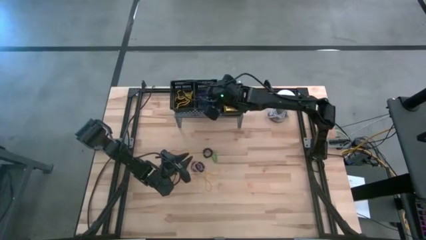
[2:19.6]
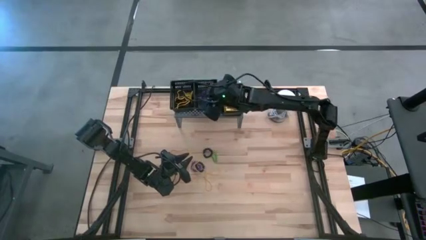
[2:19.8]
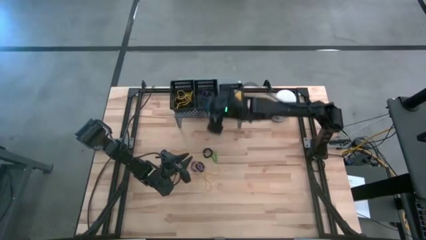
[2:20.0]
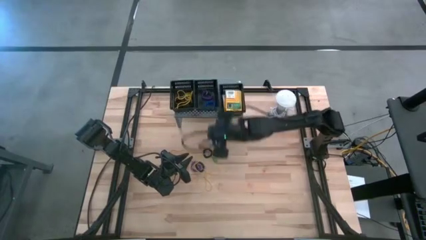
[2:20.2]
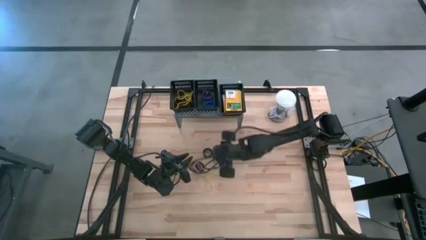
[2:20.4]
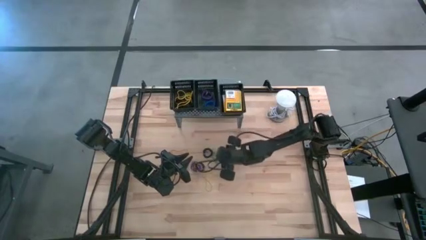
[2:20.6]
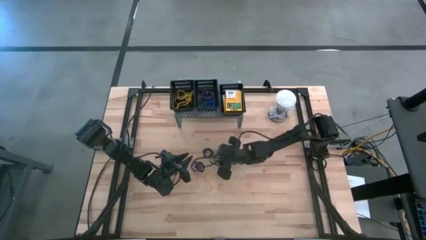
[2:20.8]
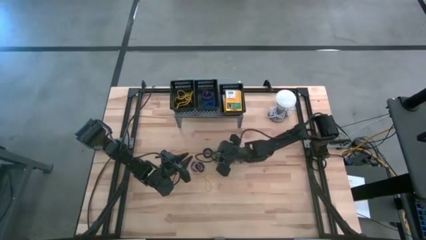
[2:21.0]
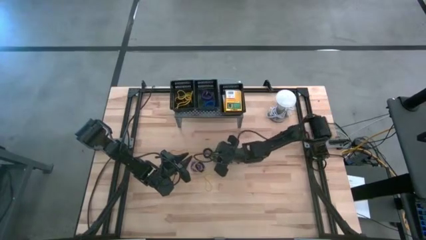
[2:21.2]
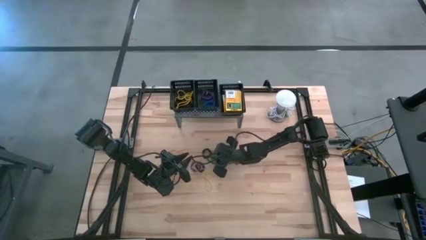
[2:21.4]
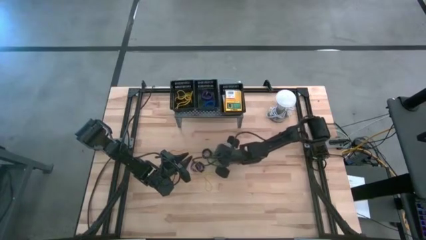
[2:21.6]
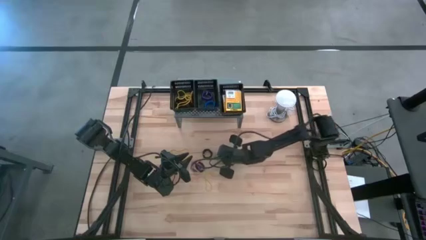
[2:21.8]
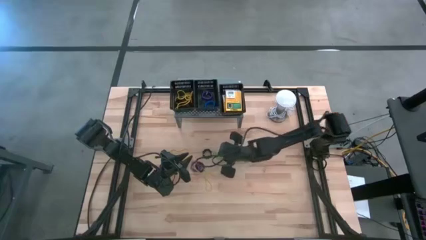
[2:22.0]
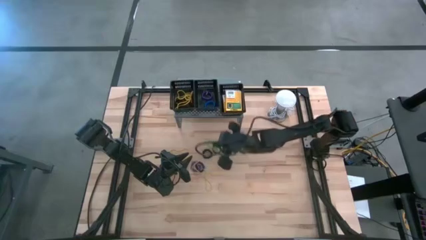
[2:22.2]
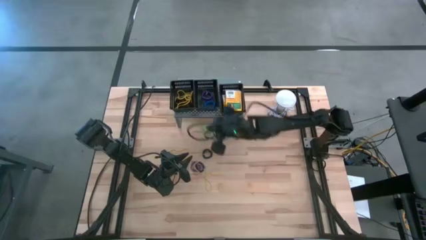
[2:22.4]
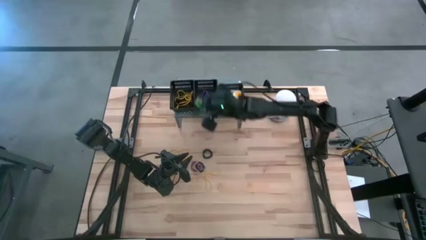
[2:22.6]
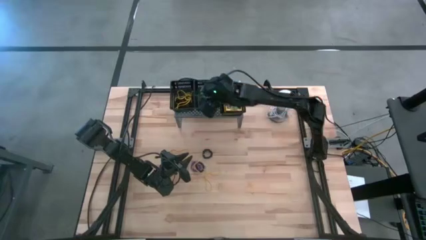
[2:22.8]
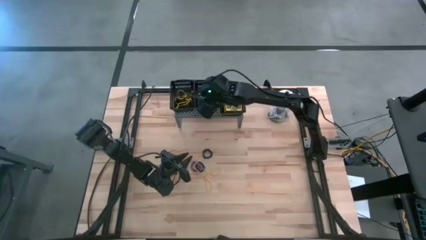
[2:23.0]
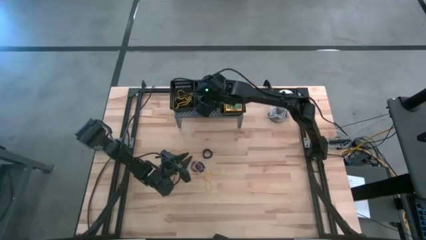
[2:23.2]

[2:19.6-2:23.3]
Task: Pick & Place Office Desk Supplies
Put the green spring keychain into the middle black bin on the shelf

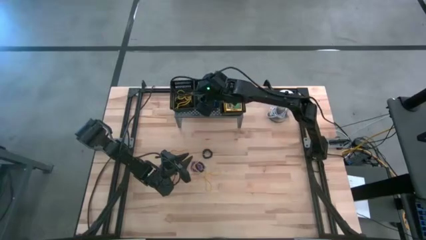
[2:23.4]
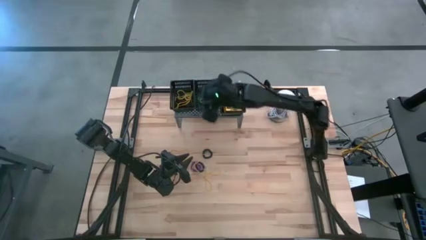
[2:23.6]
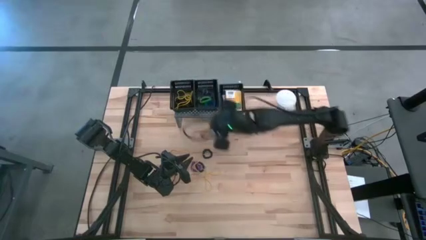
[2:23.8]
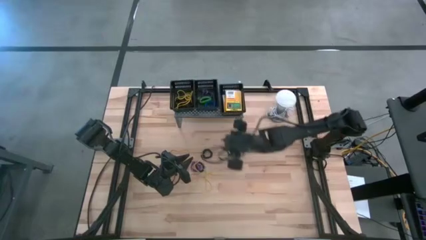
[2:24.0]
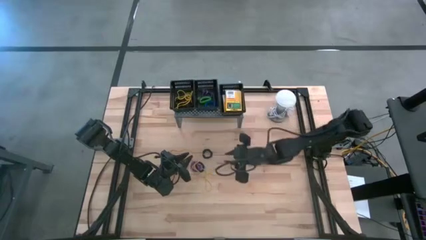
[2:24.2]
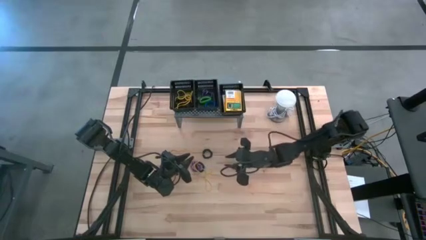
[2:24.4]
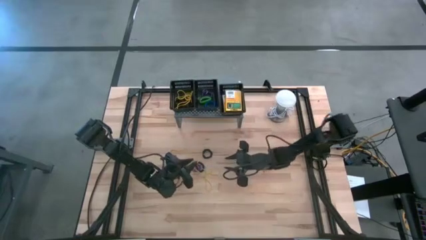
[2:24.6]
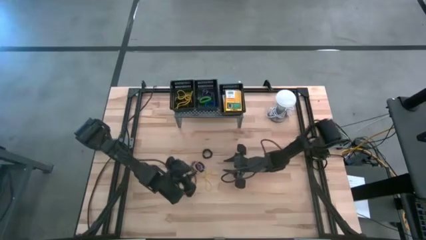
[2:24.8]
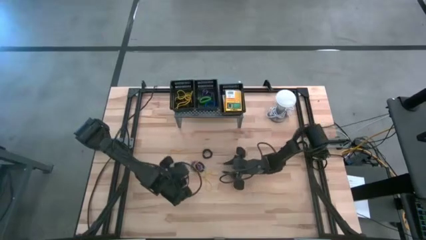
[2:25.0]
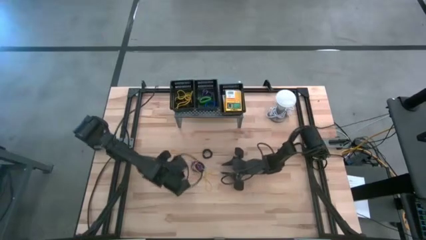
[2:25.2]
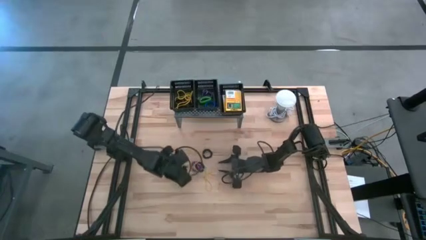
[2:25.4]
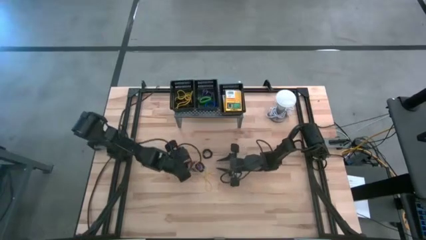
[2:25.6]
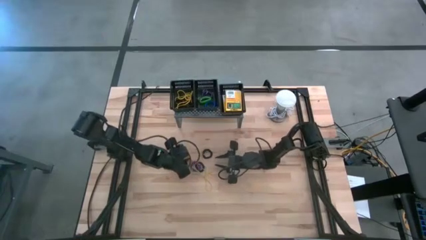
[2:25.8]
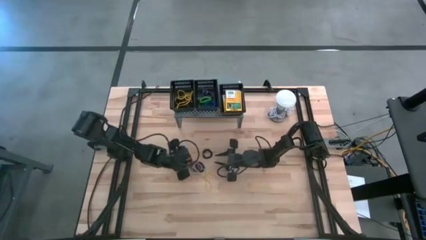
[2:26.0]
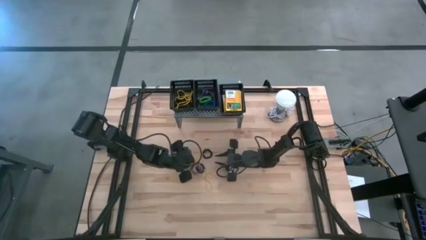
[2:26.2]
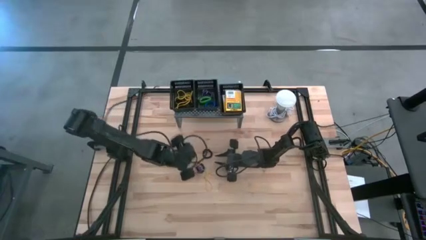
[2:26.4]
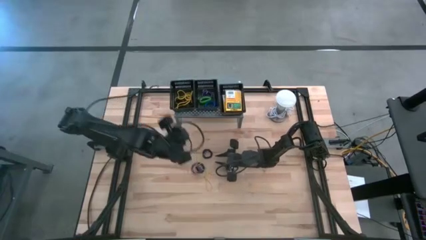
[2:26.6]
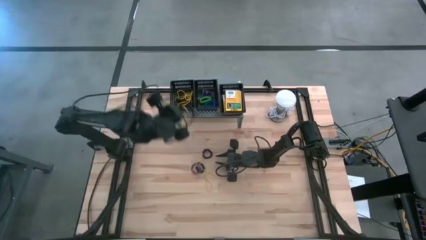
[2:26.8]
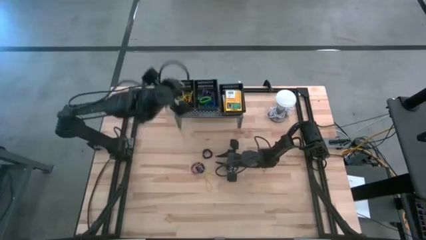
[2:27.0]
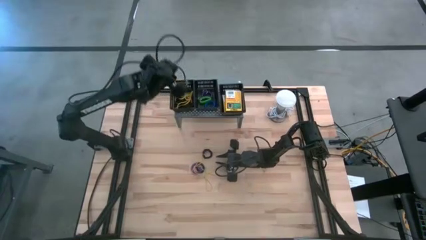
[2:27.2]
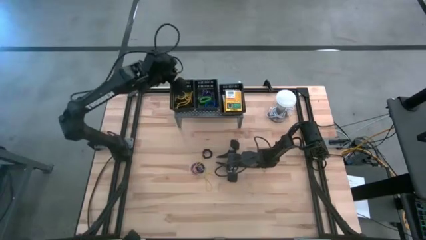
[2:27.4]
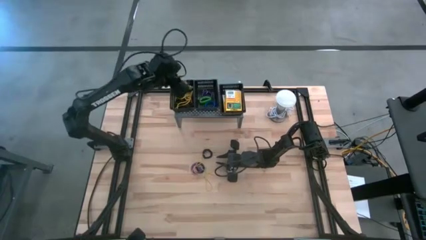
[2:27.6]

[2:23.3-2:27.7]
Put the yellow rubberband into the left black bin on the shelf

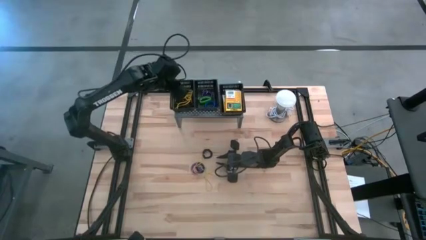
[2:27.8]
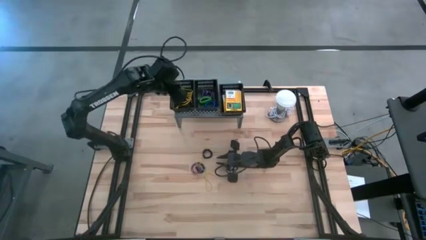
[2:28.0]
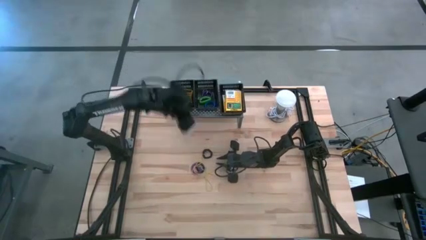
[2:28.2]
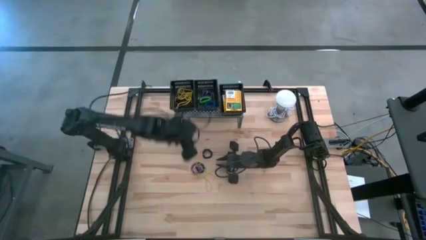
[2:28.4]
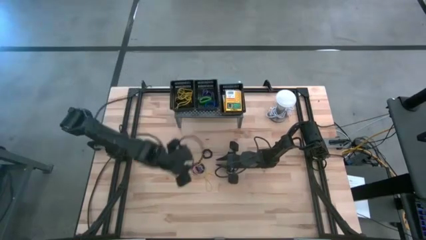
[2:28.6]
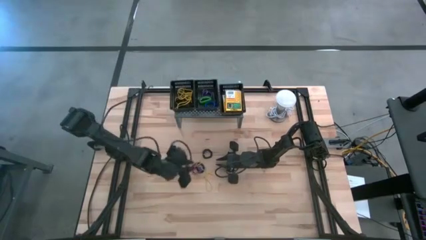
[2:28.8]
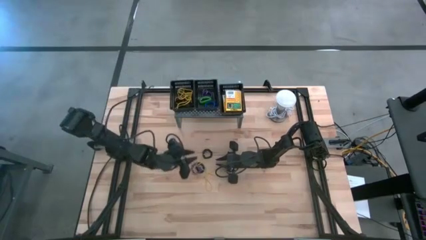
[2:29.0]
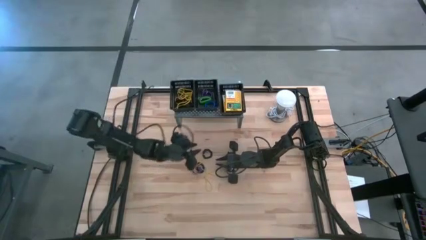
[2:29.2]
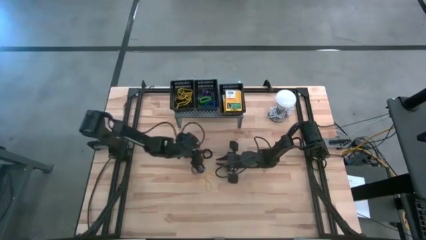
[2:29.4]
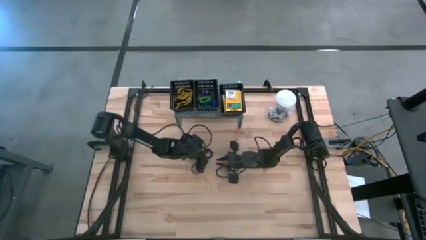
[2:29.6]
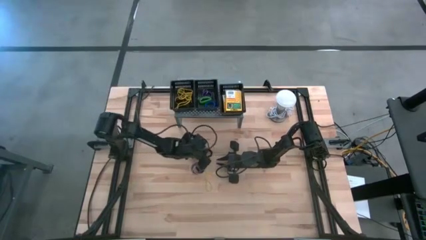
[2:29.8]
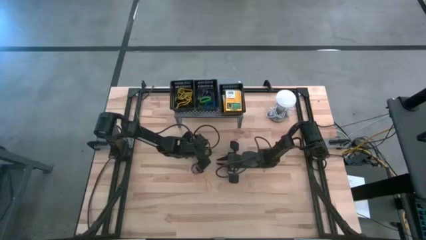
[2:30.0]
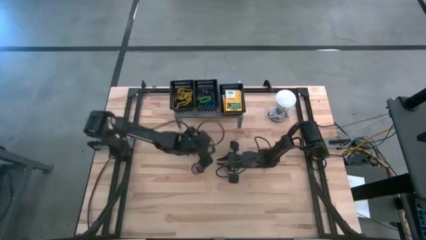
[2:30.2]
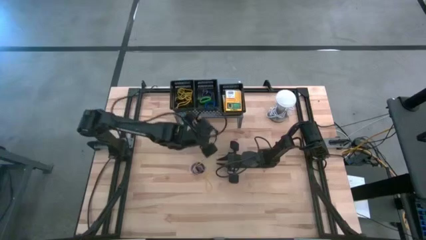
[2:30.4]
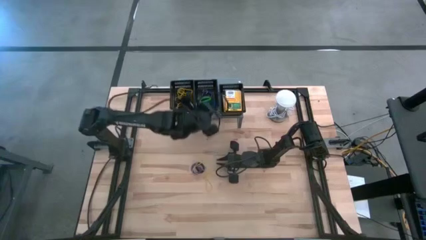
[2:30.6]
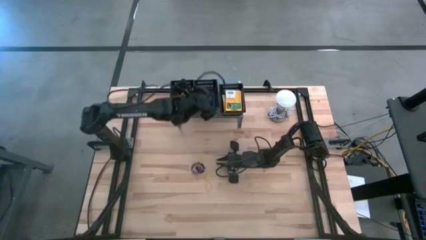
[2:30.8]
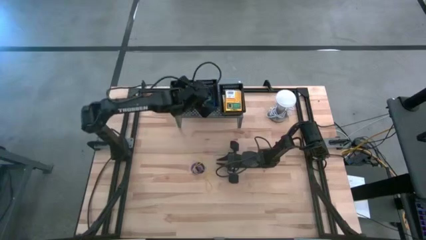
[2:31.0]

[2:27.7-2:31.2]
Put the black spring keychain into the middle black bin on the shelf

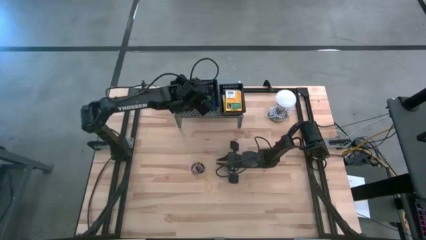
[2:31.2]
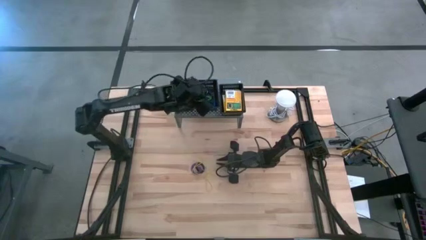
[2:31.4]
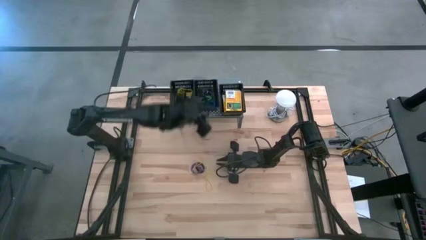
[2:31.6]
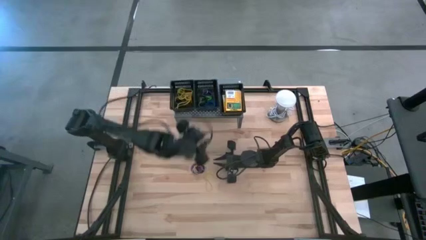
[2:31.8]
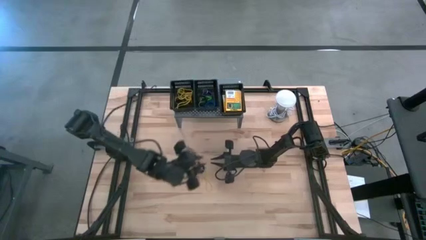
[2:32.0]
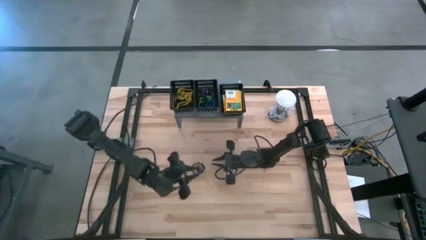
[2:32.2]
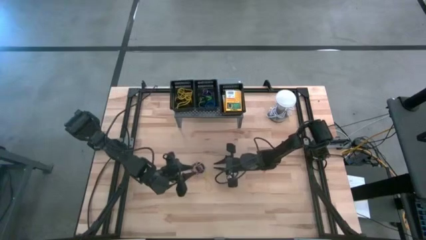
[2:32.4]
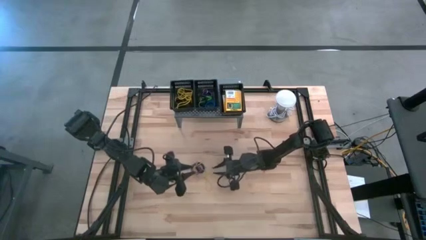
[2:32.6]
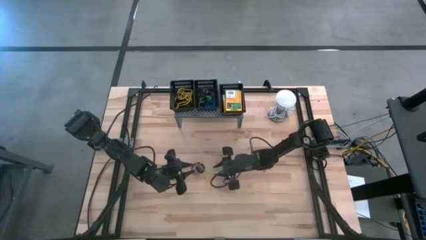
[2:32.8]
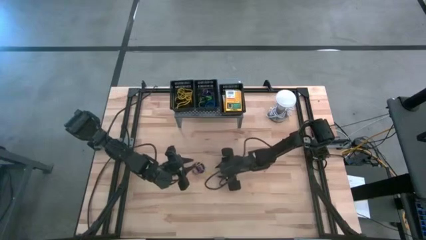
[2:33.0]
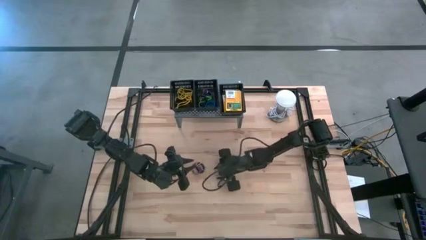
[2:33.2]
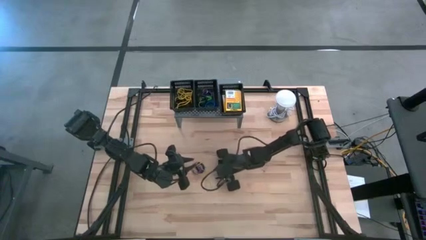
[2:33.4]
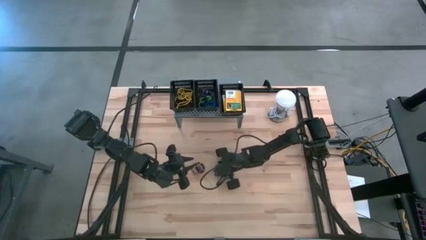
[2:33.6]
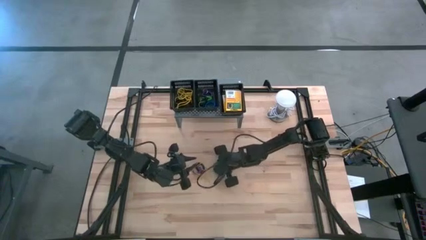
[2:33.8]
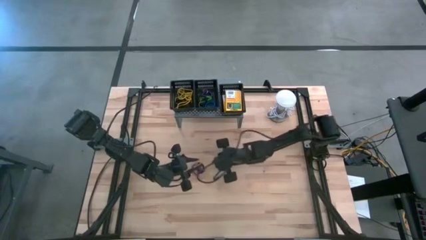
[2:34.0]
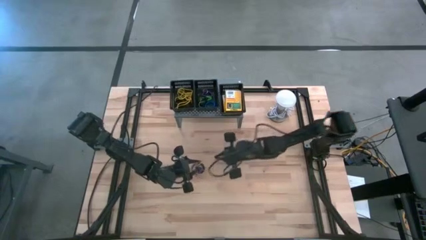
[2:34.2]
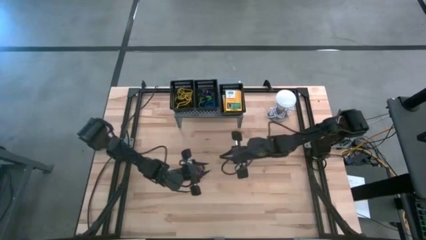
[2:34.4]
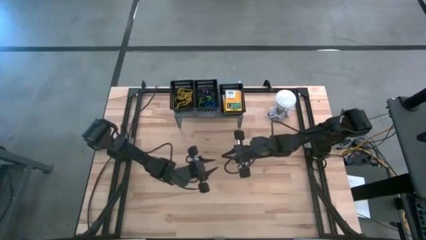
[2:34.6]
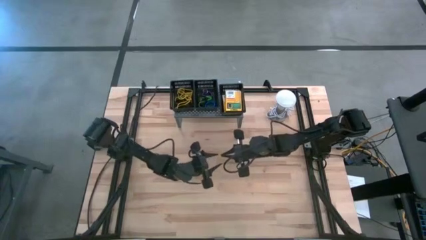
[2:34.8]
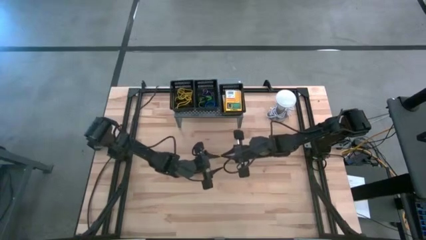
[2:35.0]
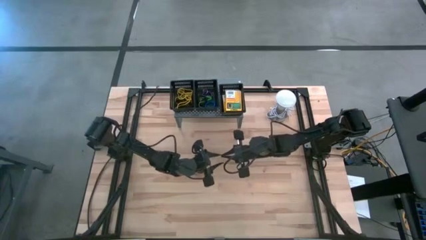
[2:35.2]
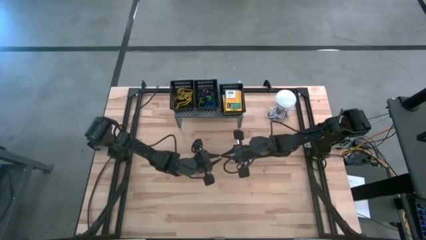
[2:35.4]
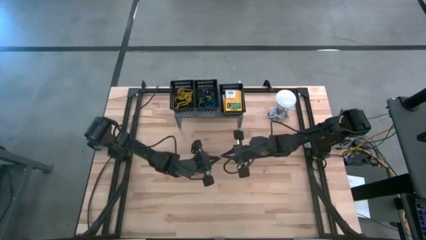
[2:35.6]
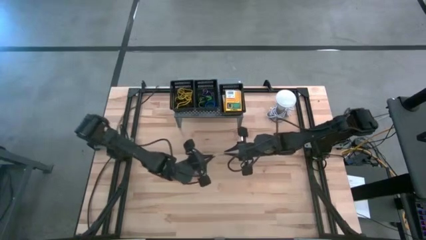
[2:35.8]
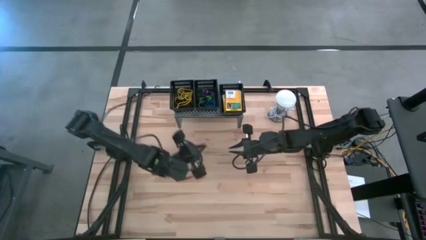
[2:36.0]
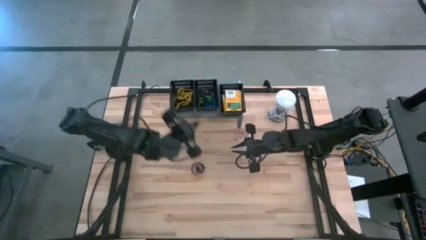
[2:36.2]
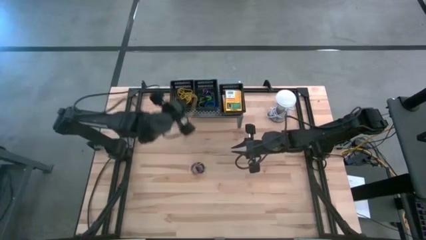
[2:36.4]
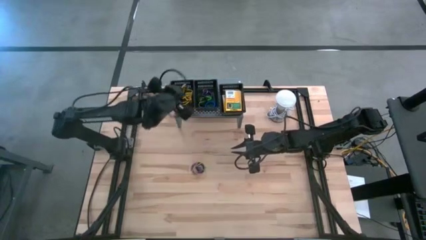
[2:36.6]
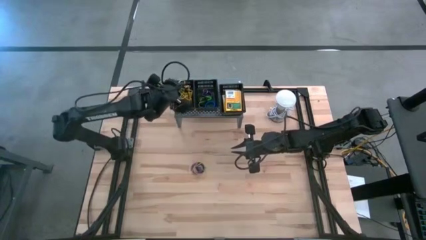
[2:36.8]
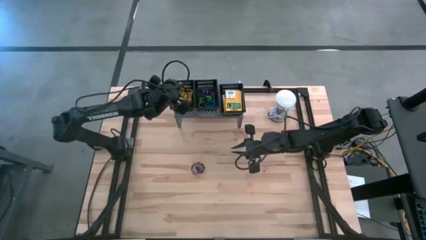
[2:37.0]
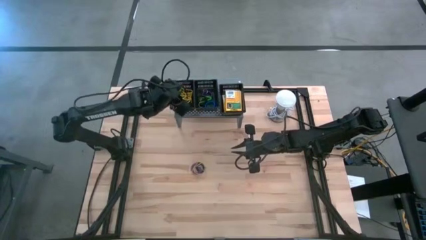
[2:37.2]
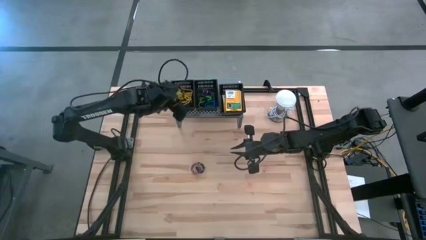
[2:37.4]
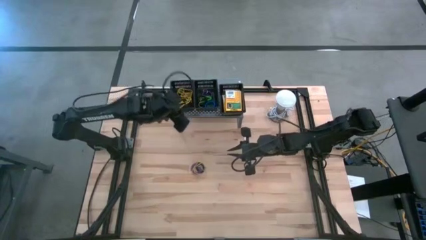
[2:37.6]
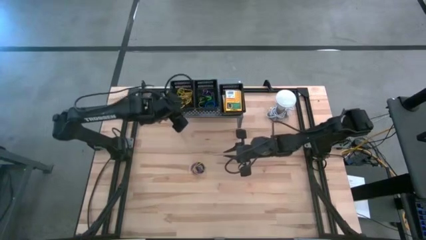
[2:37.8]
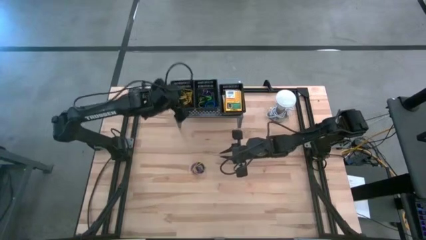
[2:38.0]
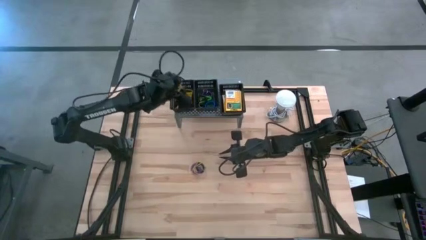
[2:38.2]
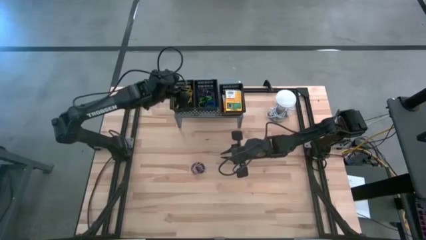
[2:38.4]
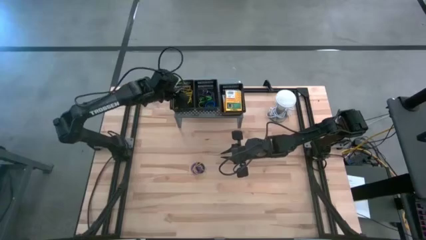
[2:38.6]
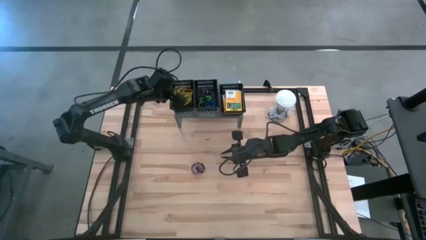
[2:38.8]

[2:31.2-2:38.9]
Put the yellow rubberband into the left black bin on the shelf
